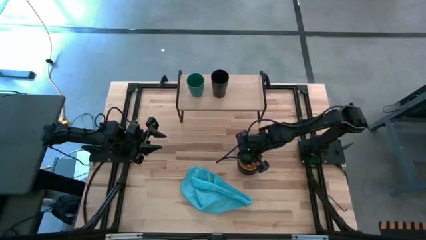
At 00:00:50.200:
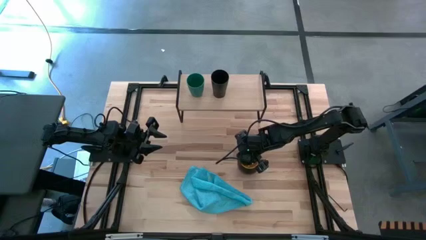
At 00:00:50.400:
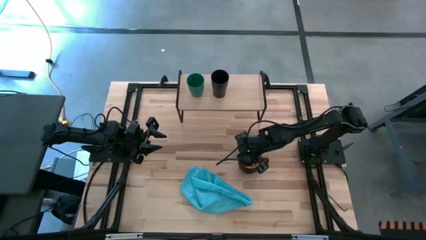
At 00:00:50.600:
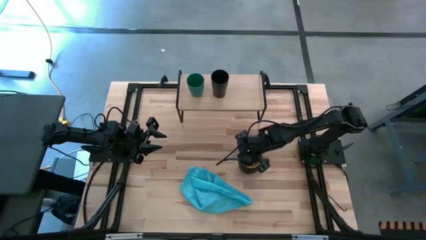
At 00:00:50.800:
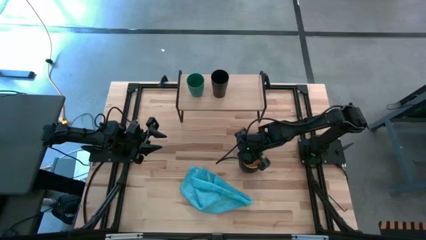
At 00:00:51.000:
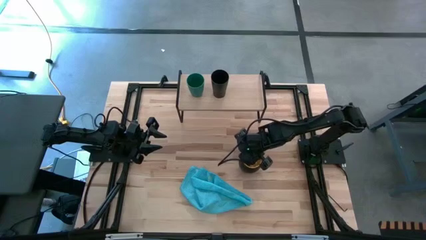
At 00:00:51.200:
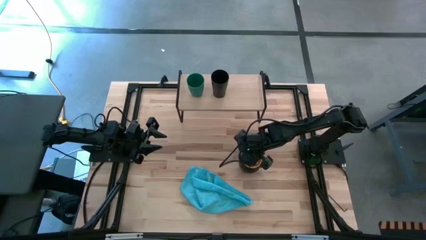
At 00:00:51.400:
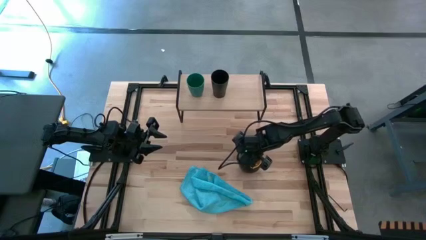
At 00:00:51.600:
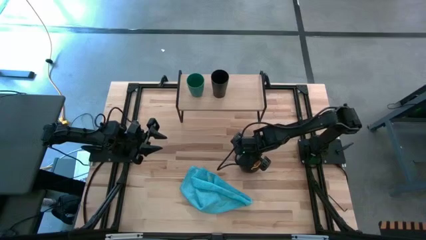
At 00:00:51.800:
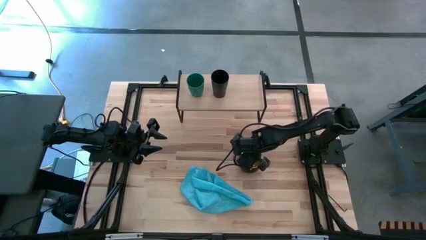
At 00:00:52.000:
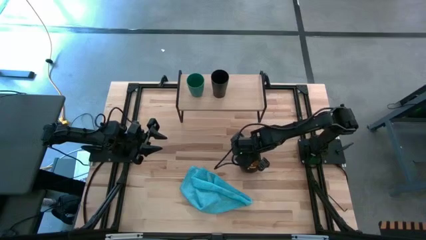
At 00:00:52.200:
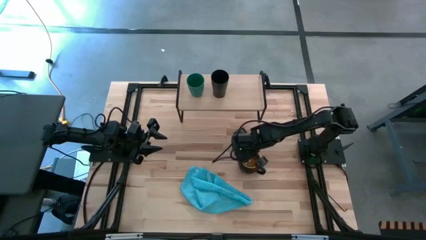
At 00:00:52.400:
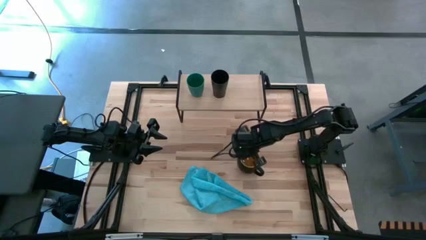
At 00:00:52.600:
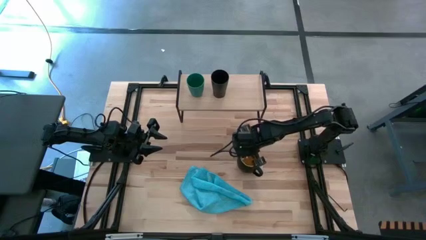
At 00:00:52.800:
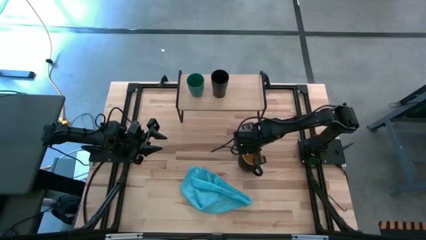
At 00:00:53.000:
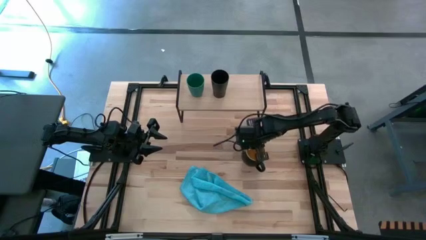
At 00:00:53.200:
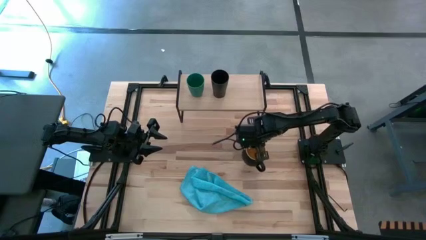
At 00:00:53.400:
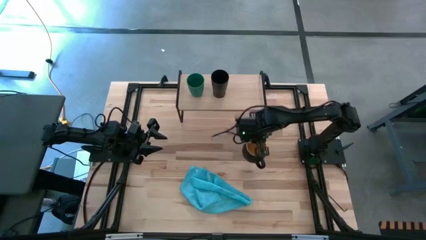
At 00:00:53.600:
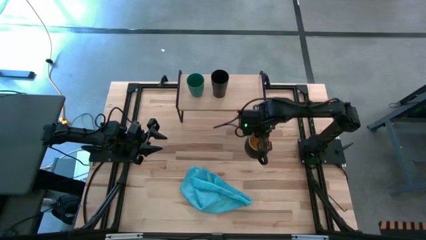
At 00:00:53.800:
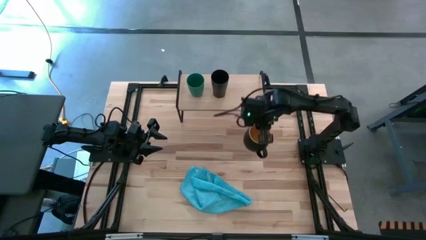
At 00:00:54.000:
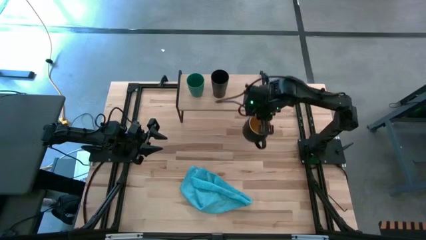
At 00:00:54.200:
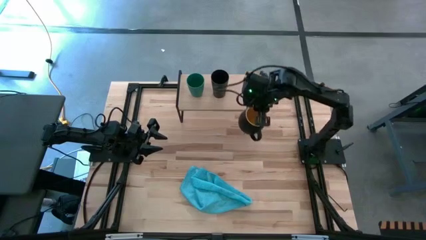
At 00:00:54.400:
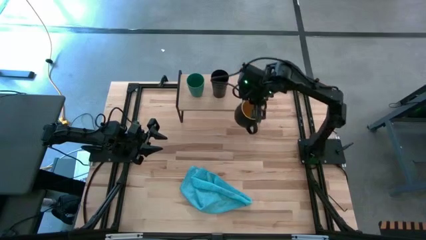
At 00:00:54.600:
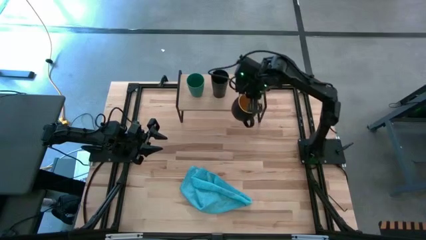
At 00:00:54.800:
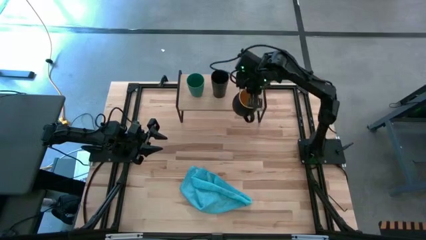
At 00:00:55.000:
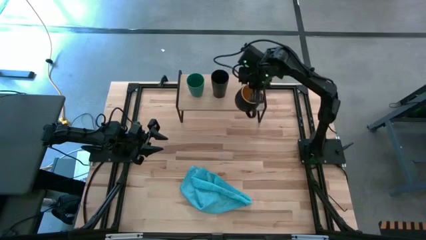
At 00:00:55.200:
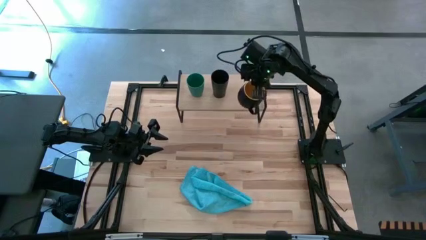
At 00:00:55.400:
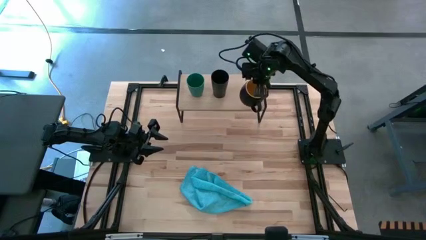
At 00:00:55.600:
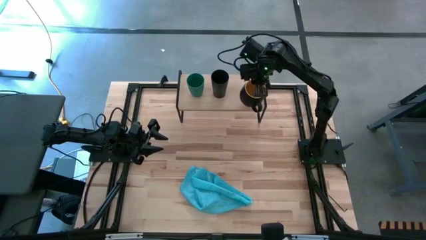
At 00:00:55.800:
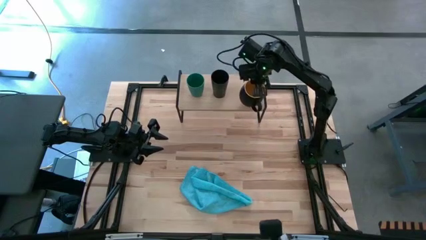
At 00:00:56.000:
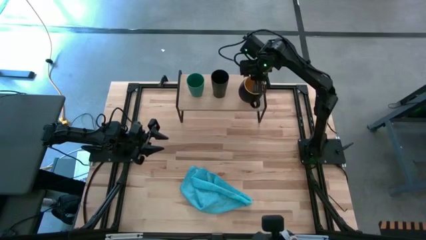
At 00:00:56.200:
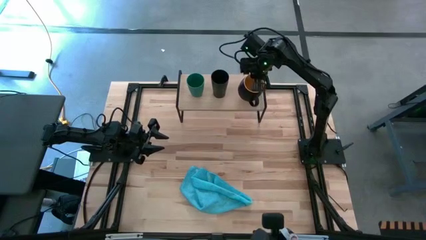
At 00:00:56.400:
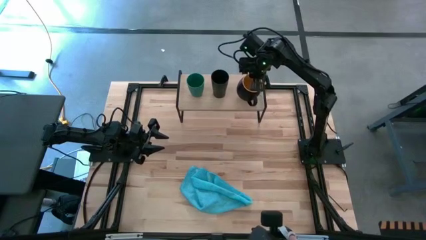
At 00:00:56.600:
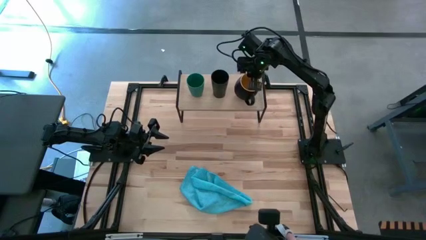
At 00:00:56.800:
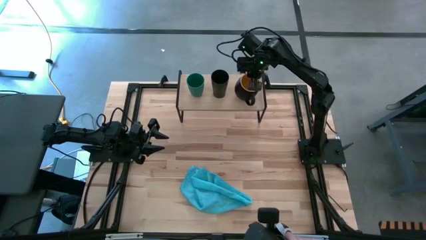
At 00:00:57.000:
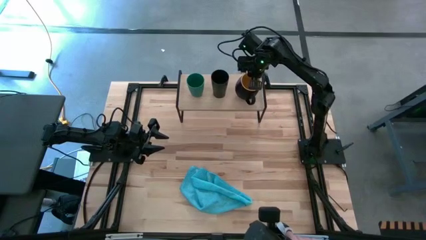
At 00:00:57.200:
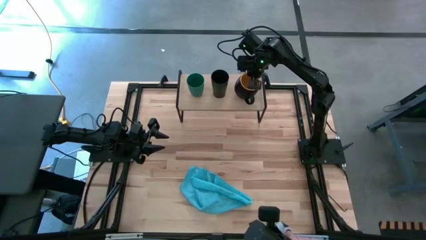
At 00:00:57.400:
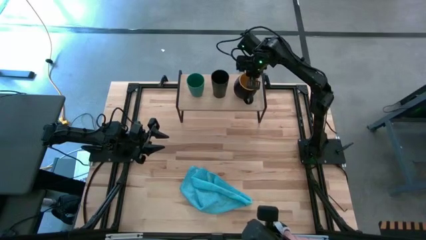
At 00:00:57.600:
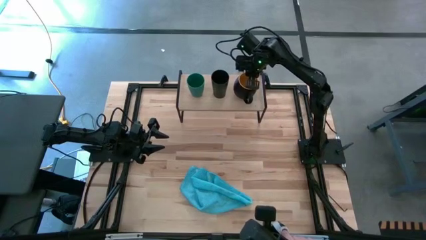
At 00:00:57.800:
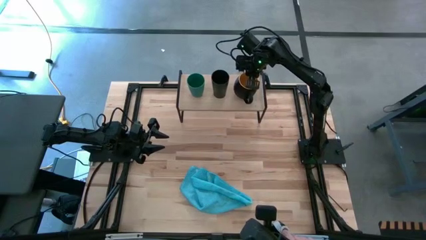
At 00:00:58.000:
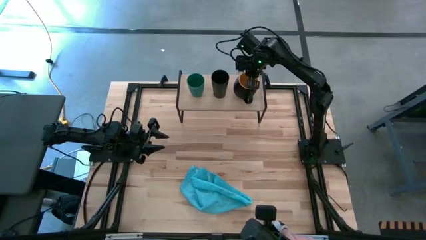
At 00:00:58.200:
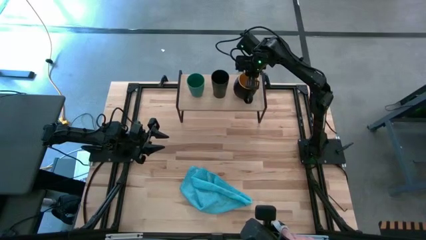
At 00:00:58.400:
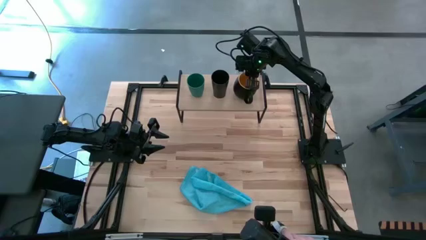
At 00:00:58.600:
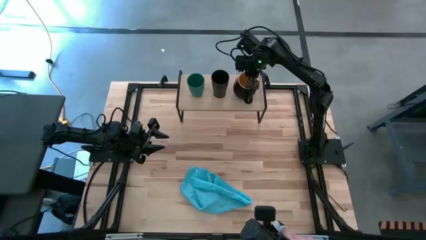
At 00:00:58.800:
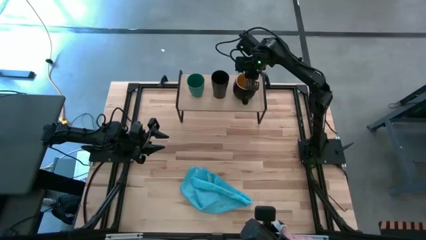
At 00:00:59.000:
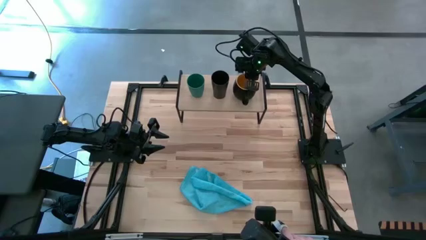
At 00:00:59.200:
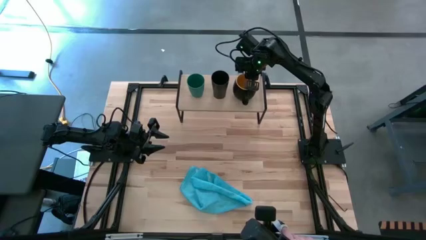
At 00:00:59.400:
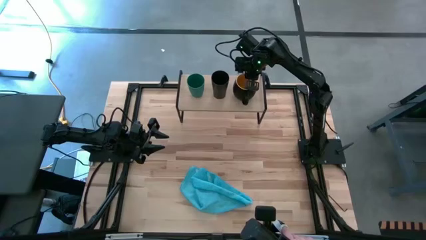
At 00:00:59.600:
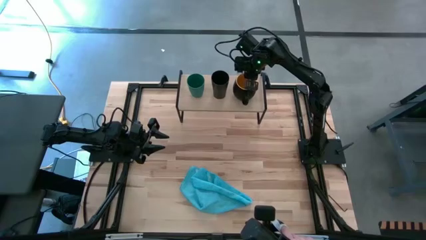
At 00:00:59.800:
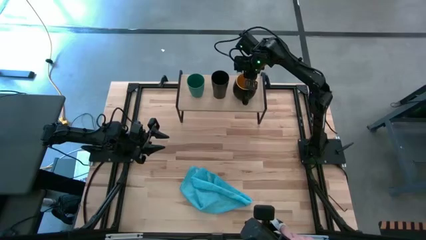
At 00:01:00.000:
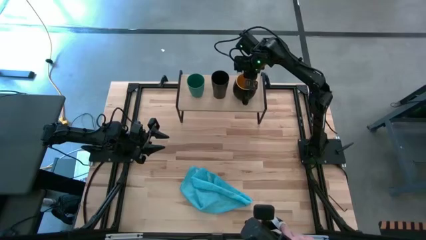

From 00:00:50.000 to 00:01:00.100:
Task: Stack small to large cups/mugs on shelf
Put the black mug on the shelf
